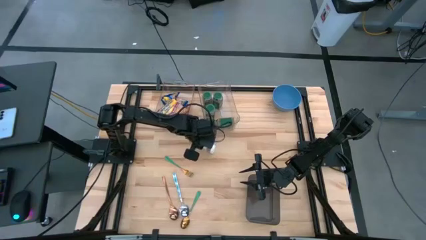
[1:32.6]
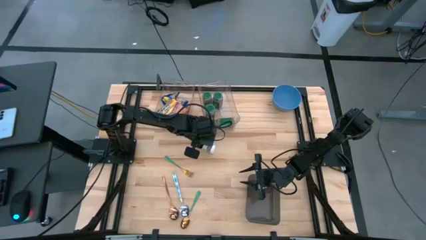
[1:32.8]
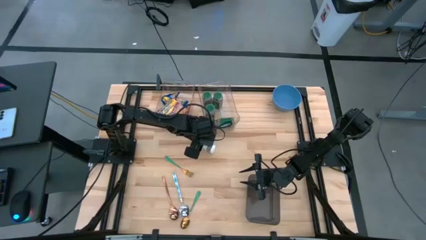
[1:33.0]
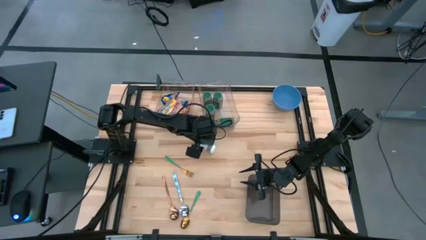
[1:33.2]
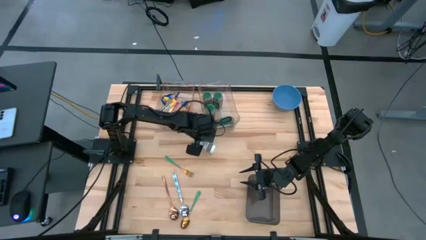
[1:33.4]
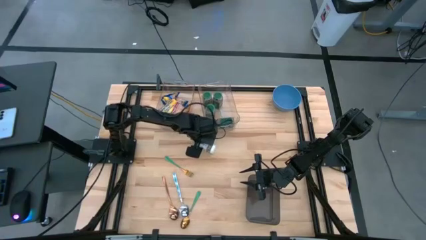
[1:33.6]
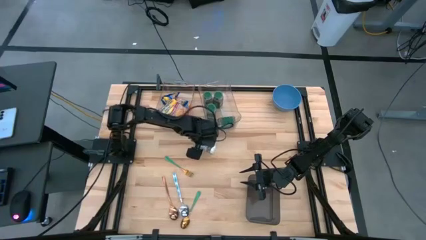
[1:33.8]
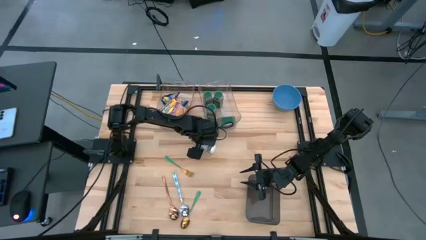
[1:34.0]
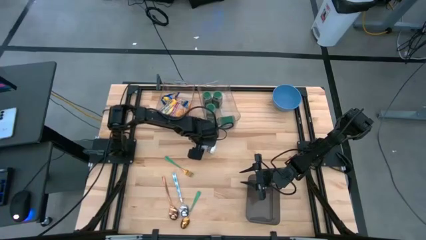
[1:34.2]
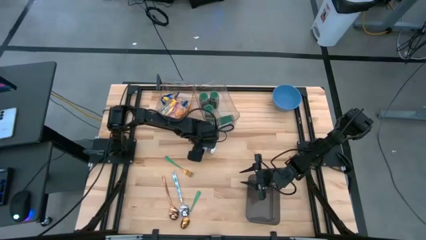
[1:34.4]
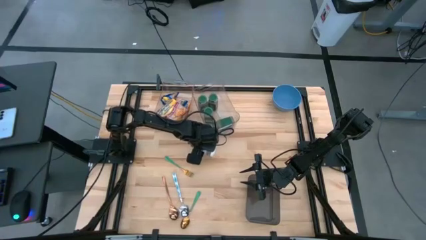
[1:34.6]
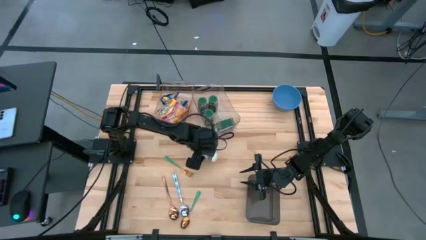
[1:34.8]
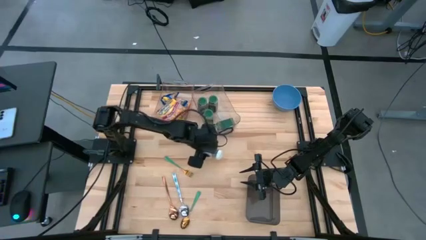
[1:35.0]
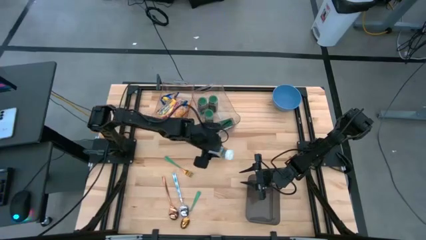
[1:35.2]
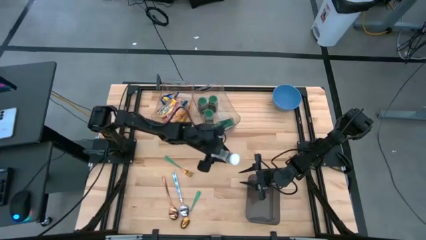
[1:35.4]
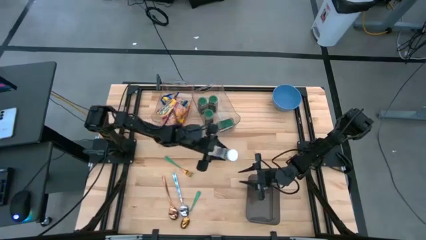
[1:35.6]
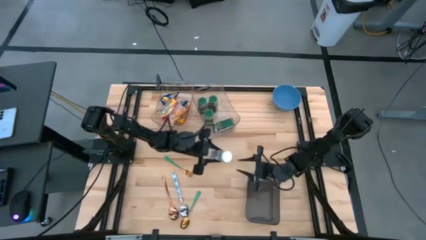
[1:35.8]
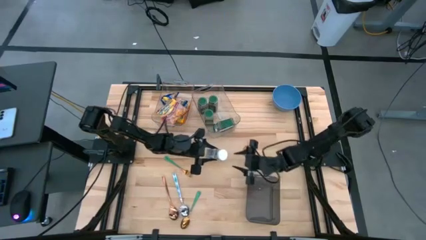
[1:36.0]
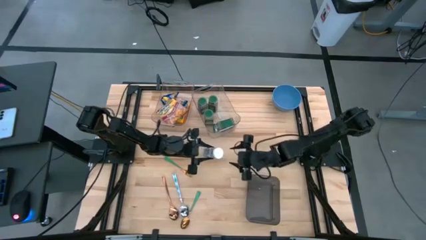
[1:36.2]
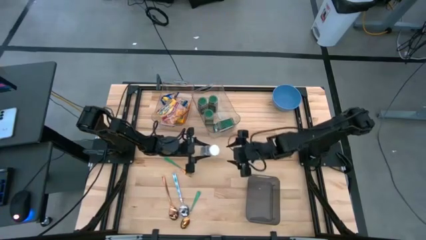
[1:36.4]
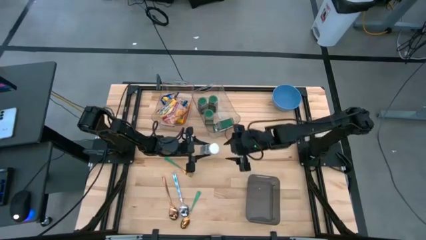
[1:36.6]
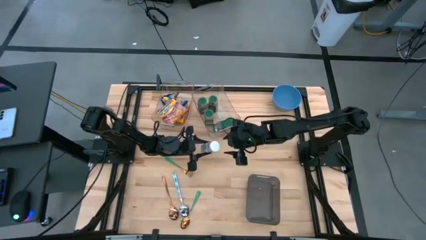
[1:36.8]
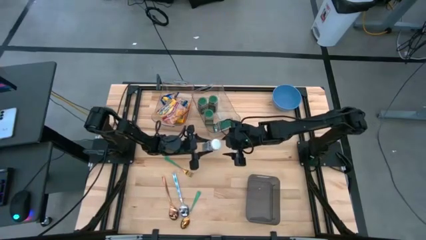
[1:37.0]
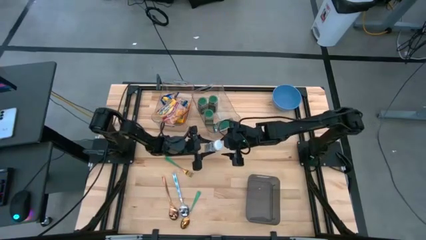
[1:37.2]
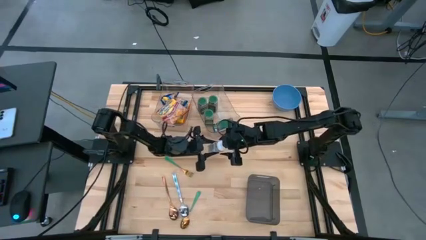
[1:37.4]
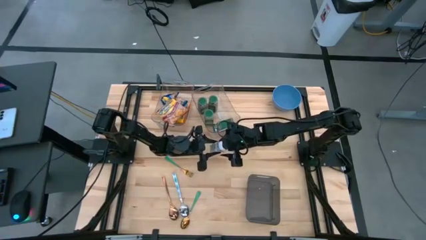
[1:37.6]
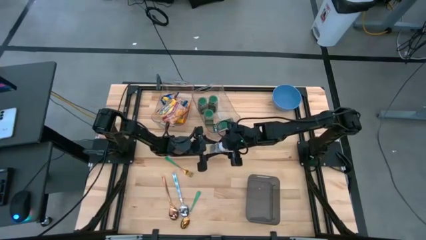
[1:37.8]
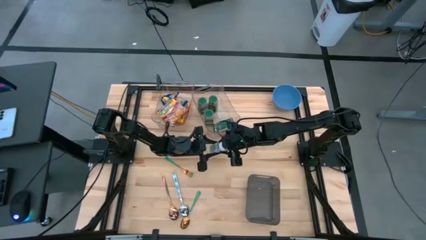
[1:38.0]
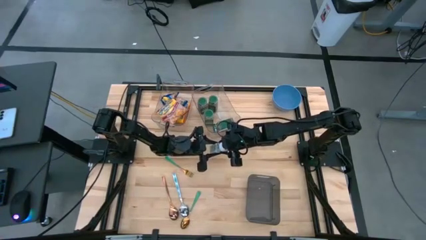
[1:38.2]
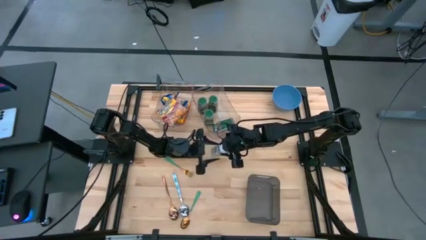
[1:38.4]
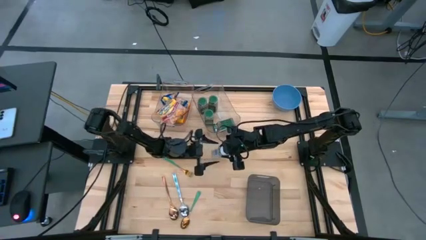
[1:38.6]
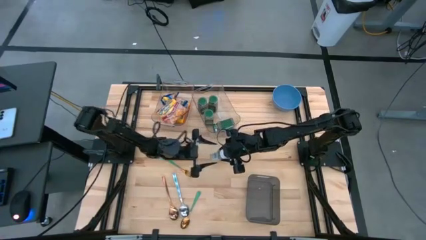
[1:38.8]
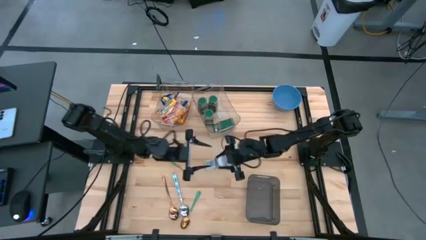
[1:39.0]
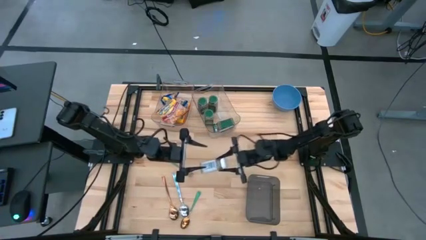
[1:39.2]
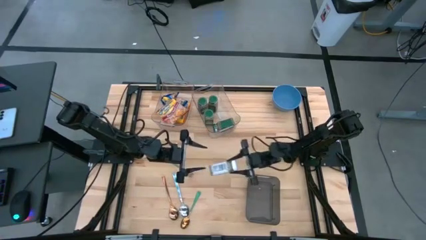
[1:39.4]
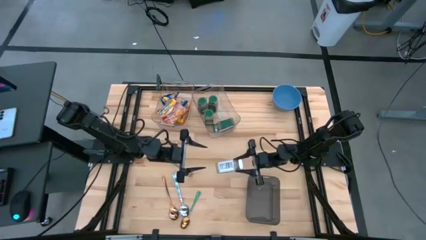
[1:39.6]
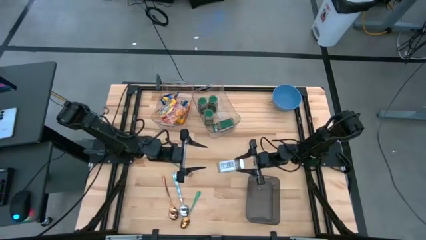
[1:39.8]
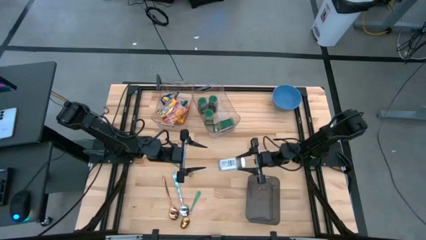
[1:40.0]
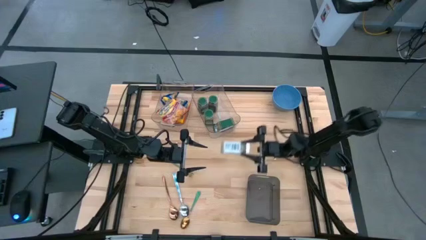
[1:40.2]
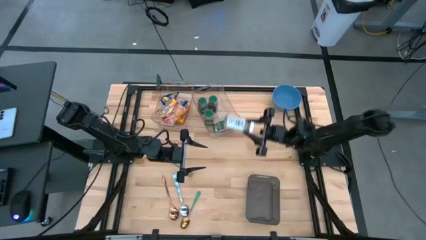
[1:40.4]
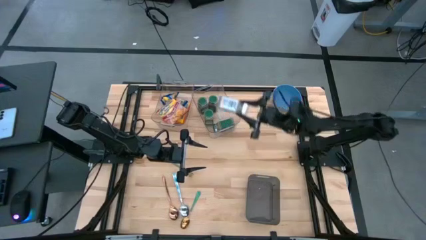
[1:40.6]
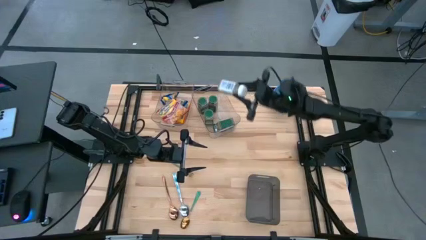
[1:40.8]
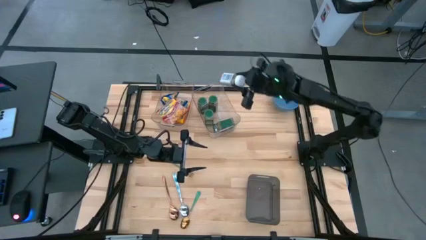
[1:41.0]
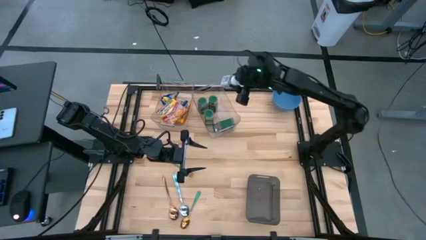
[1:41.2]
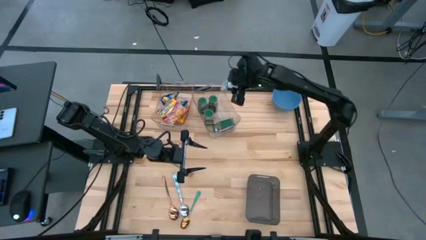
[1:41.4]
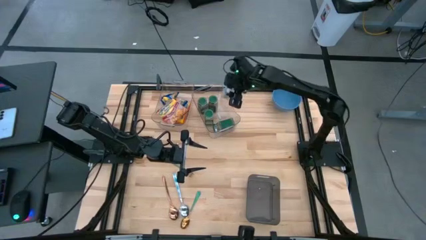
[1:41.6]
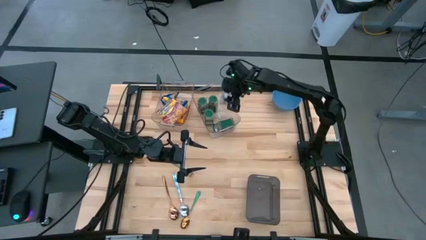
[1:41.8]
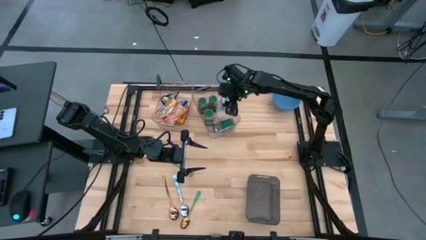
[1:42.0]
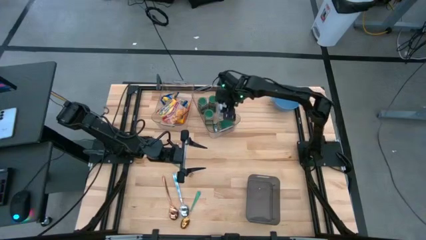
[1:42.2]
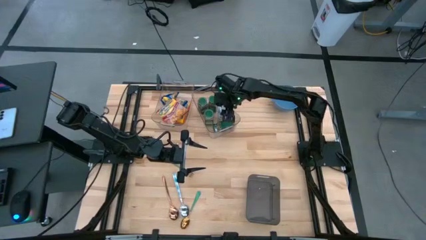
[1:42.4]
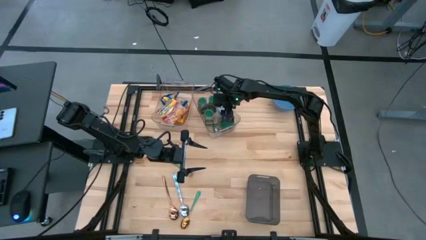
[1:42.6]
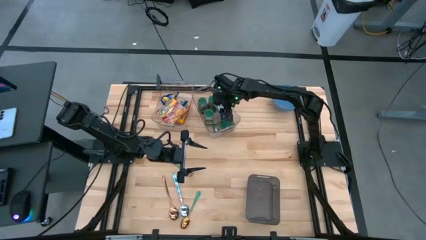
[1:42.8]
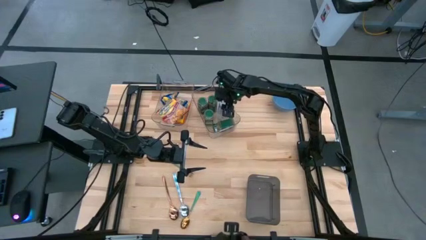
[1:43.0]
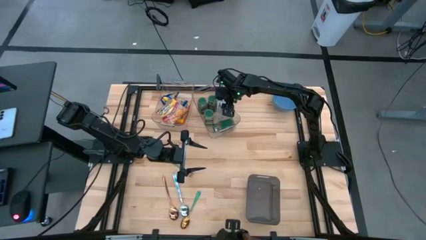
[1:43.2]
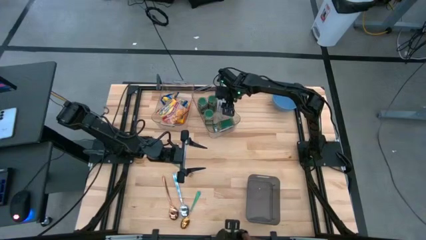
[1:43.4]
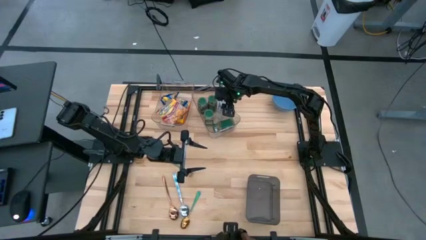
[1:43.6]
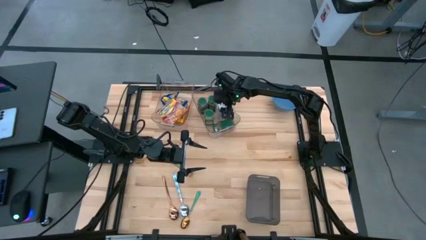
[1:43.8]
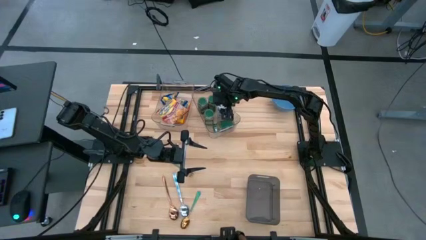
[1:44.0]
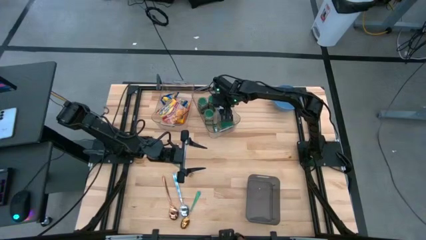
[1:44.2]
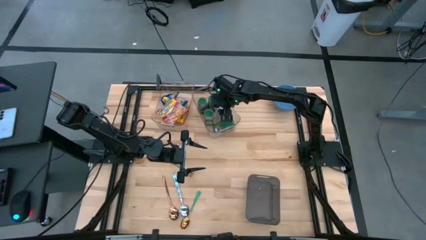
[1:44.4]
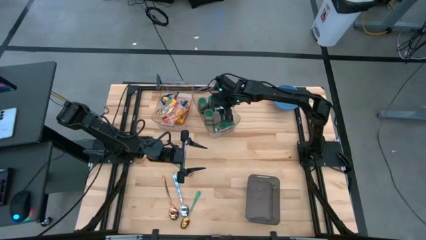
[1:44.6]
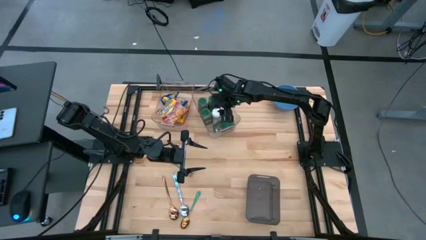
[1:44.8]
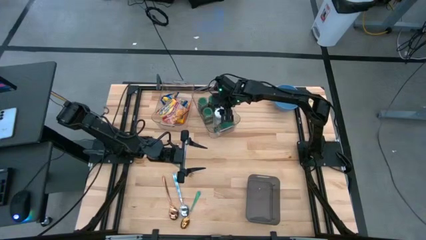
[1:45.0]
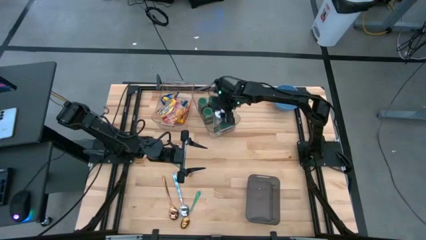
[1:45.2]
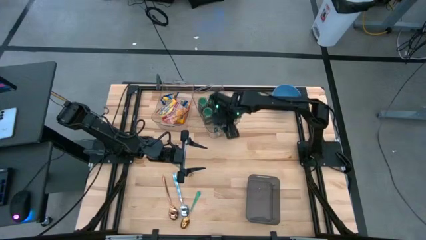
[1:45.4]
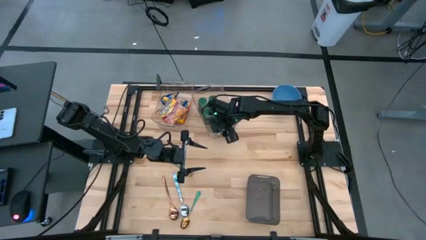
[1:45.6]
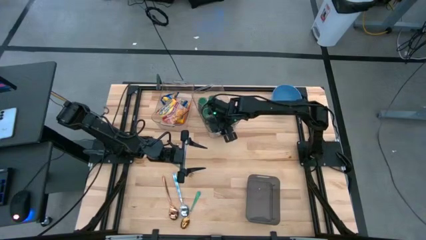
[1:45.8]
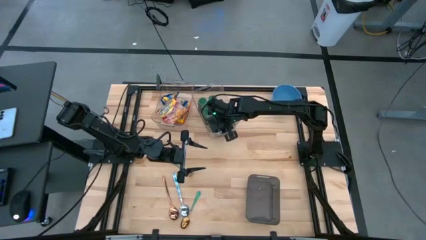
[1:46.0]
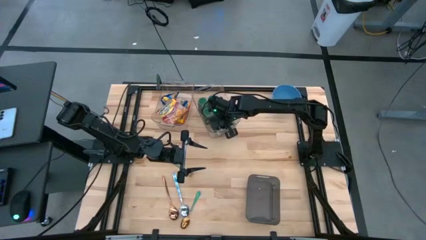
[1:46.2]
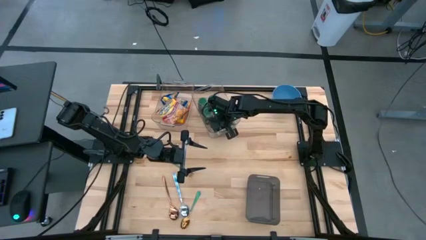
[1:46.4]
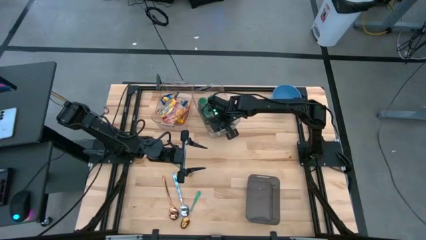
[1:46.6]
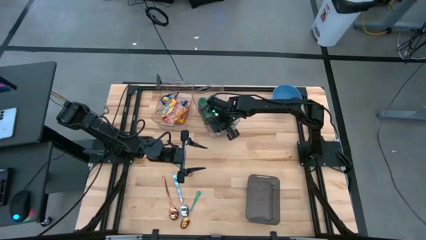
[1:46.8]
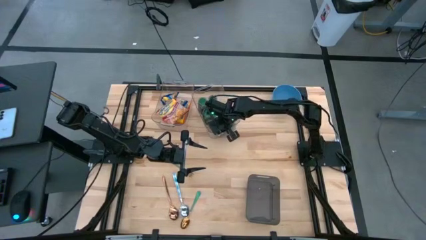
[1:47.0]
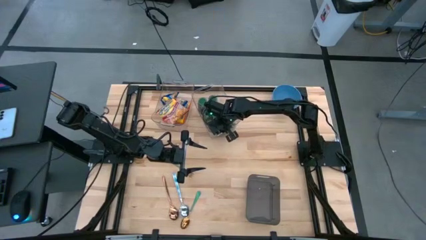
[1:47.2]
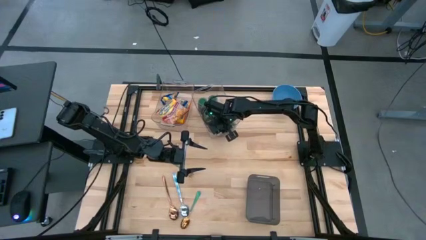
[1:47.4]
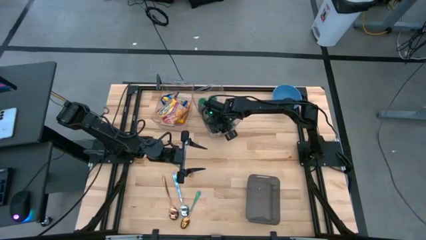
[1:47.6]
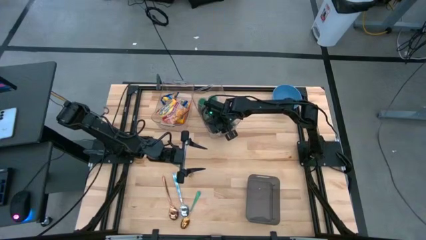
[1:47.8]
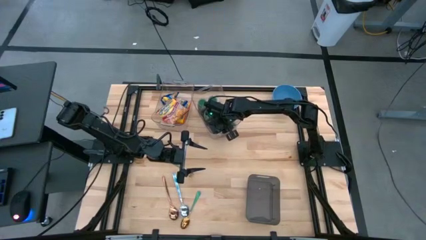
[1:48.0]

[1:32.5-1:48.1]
Put the white spice bottle into the right transparent bin
